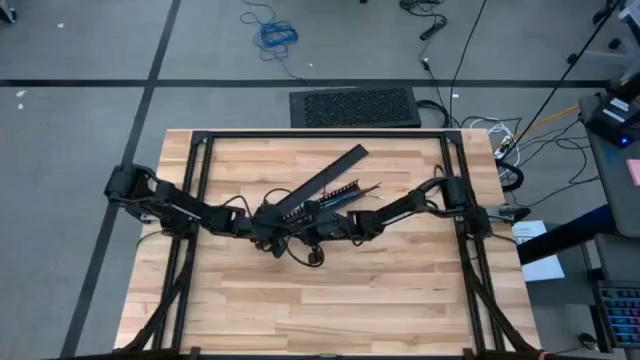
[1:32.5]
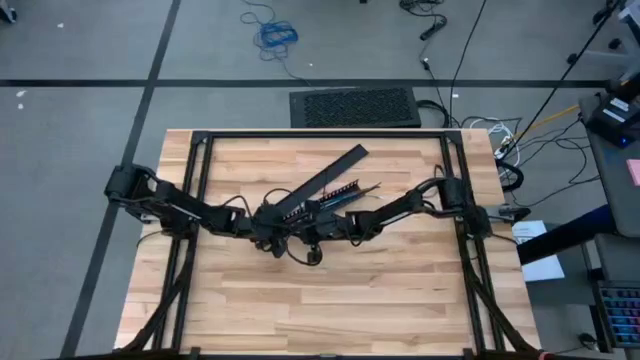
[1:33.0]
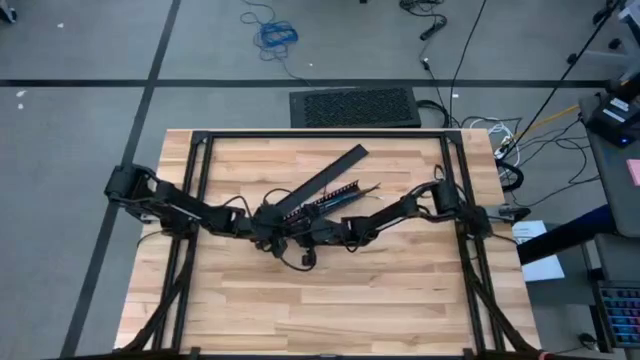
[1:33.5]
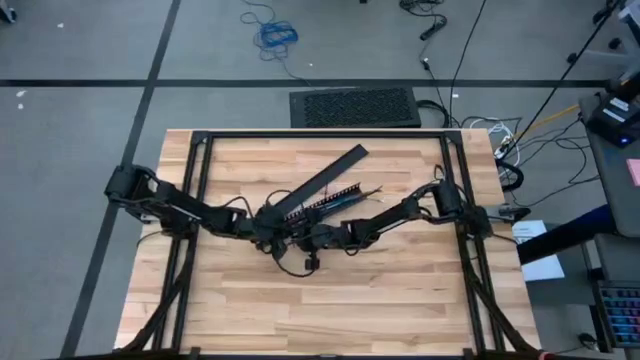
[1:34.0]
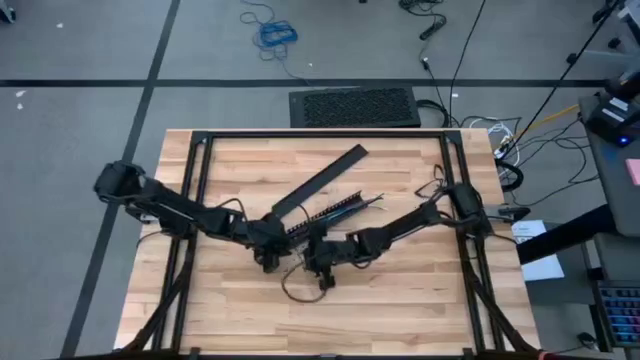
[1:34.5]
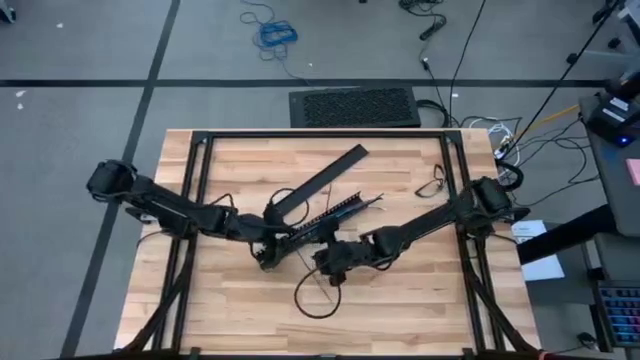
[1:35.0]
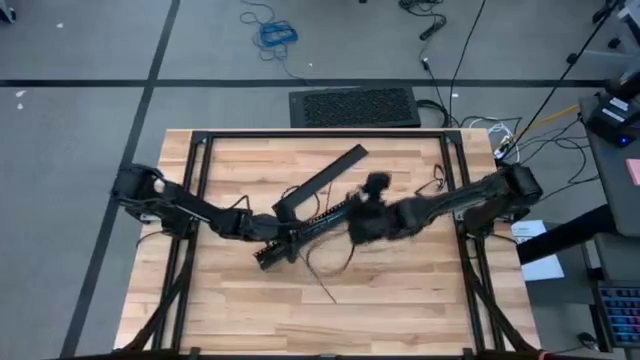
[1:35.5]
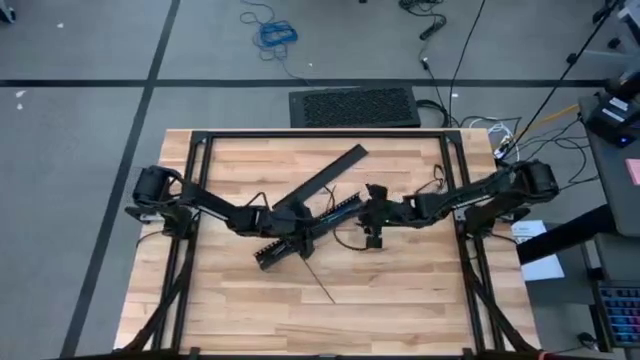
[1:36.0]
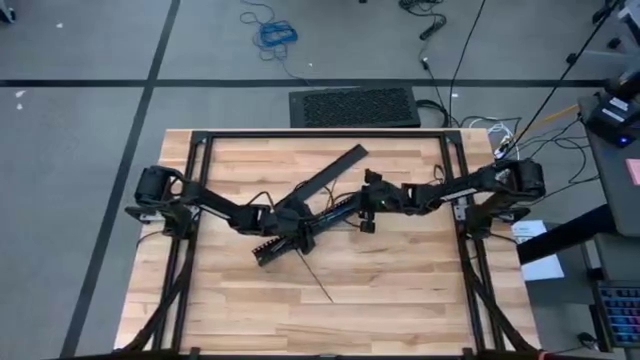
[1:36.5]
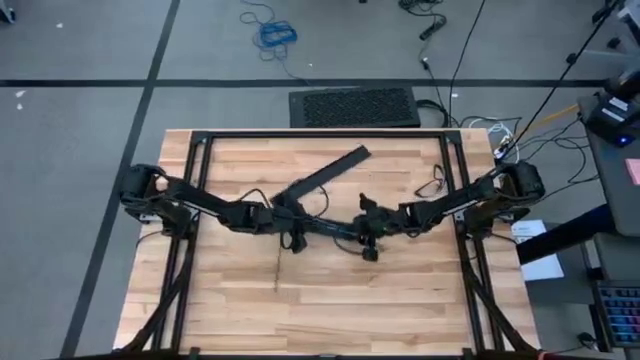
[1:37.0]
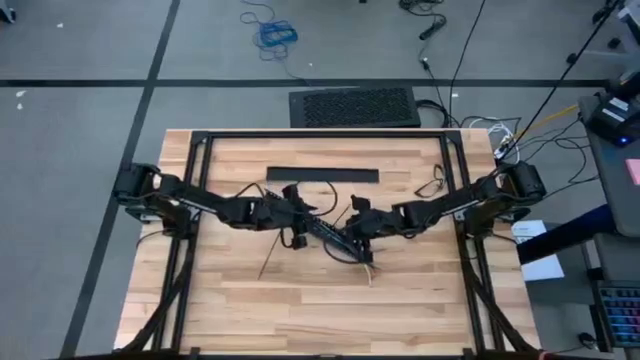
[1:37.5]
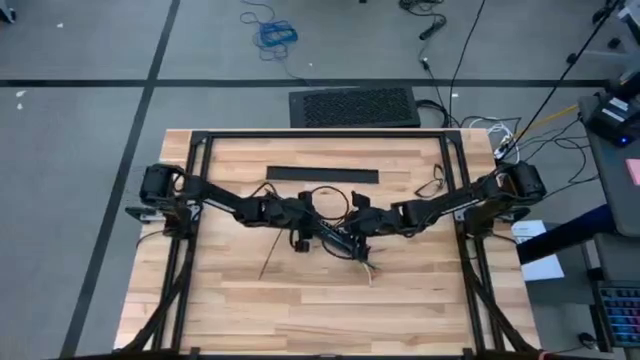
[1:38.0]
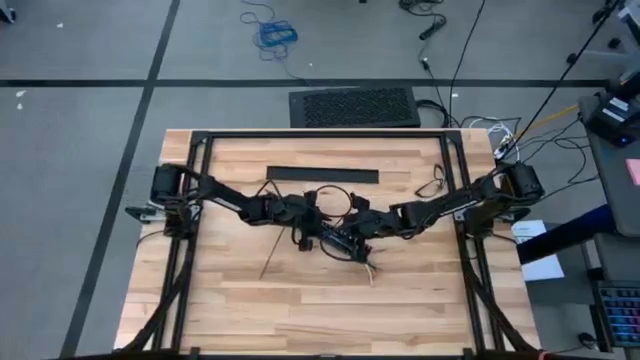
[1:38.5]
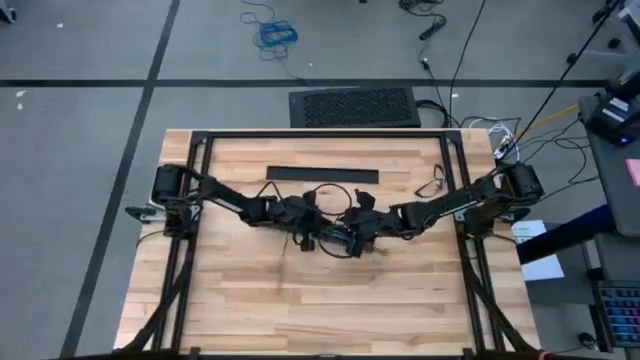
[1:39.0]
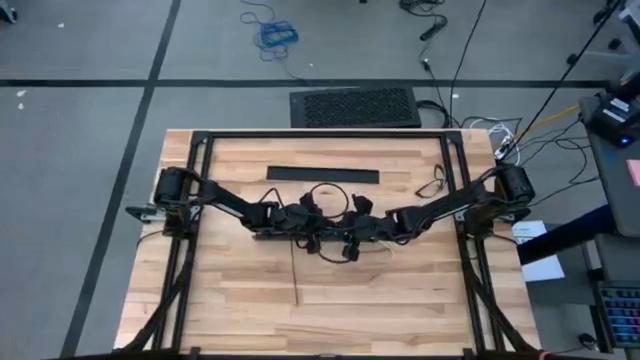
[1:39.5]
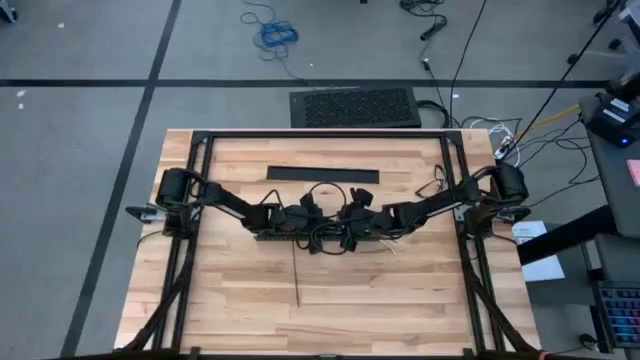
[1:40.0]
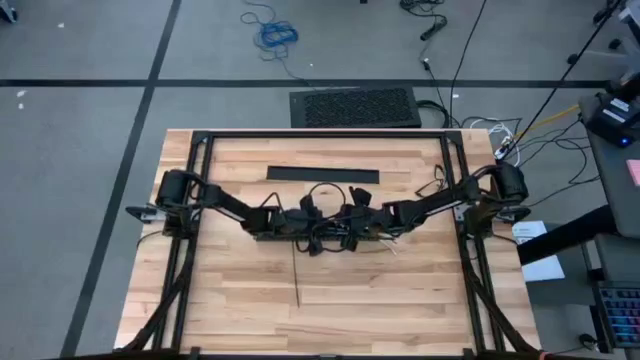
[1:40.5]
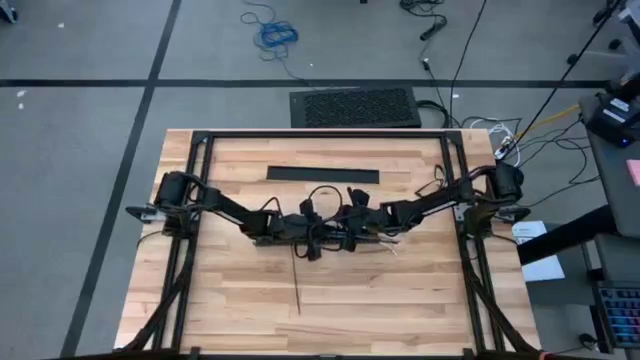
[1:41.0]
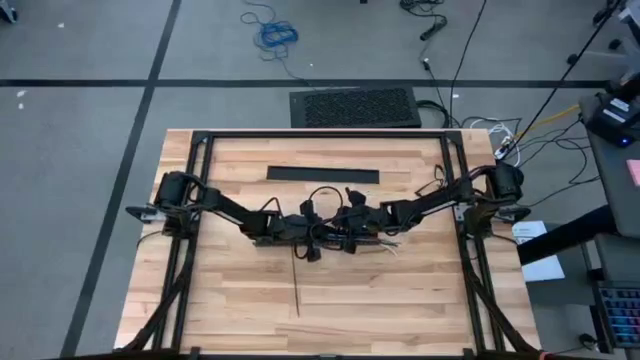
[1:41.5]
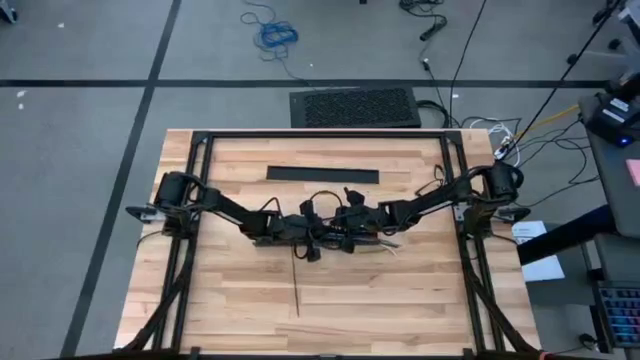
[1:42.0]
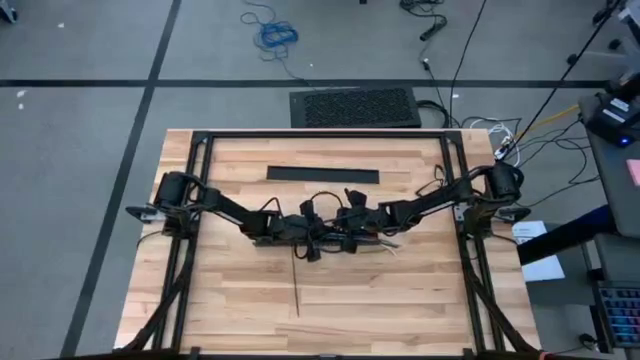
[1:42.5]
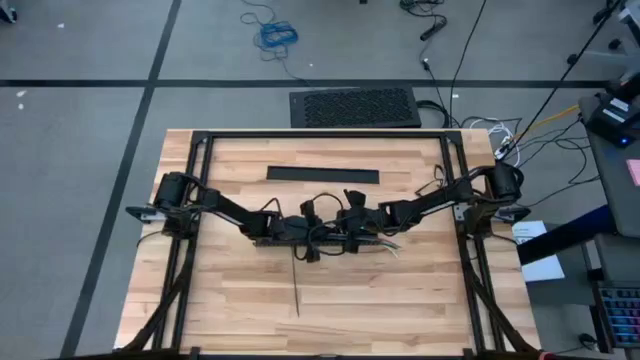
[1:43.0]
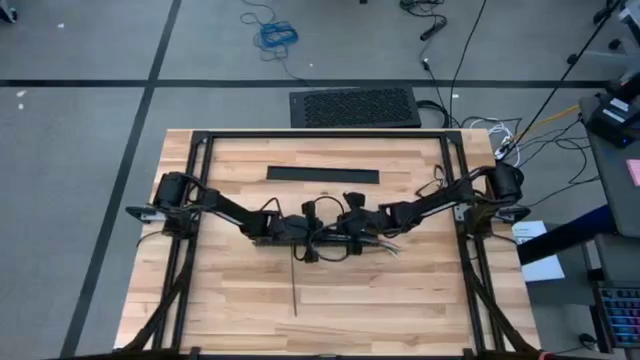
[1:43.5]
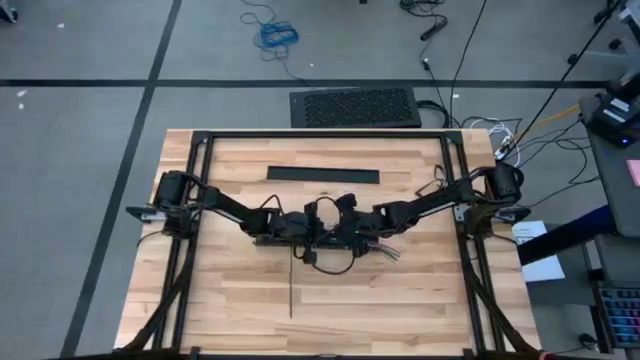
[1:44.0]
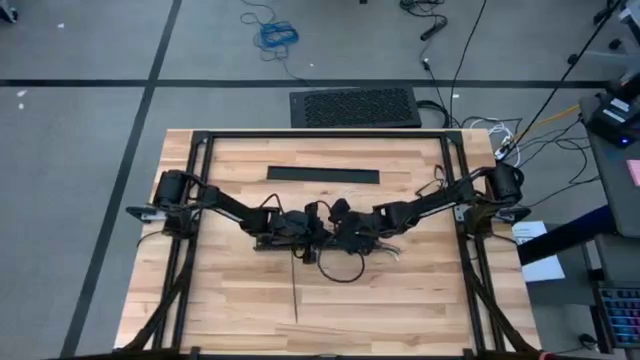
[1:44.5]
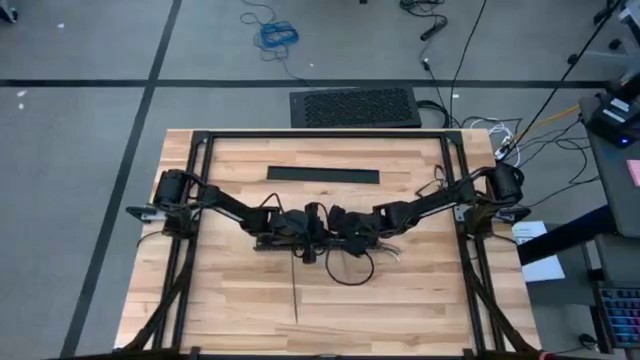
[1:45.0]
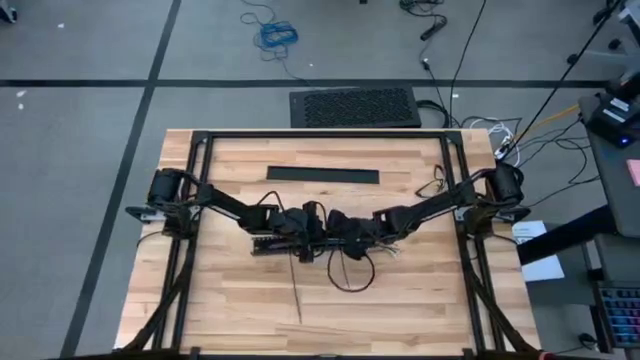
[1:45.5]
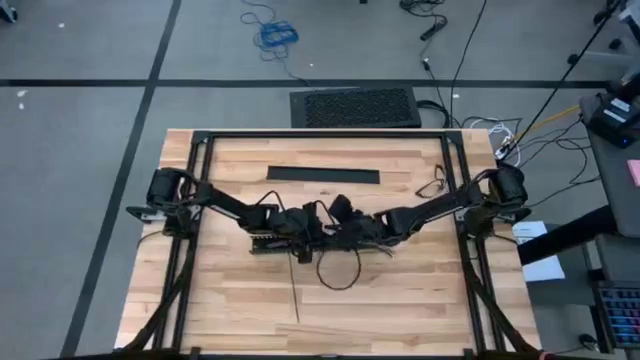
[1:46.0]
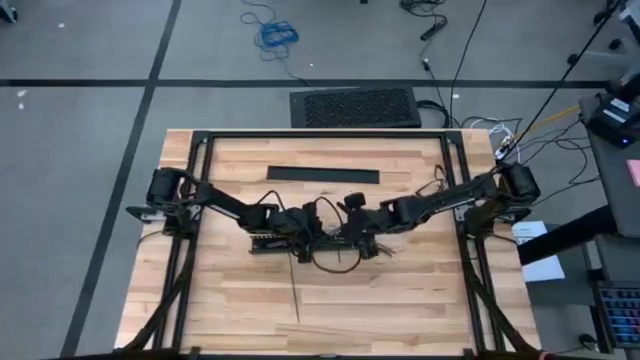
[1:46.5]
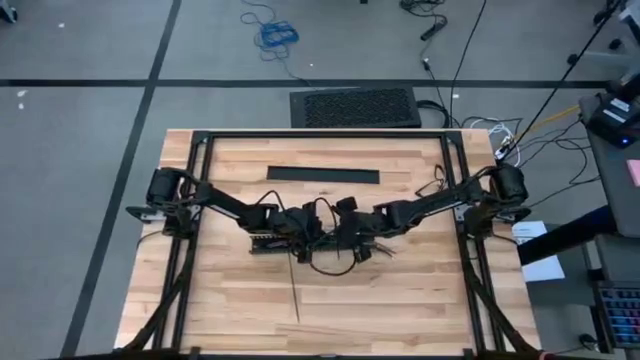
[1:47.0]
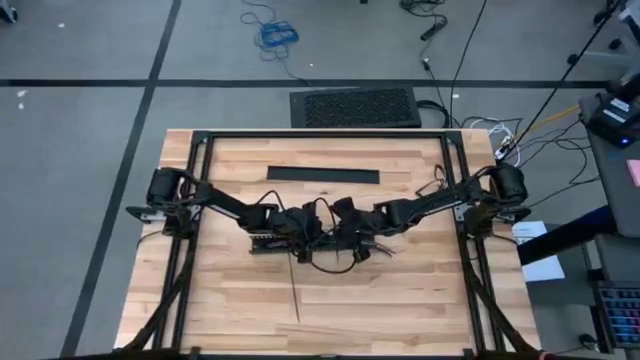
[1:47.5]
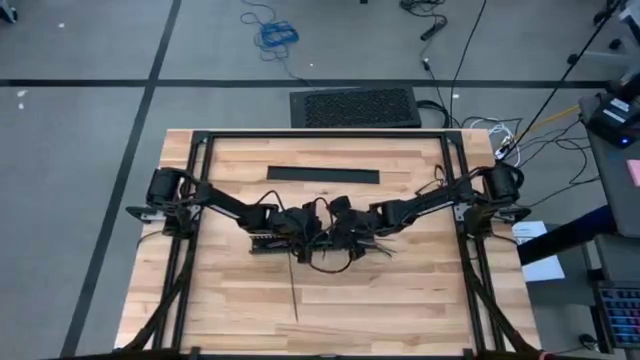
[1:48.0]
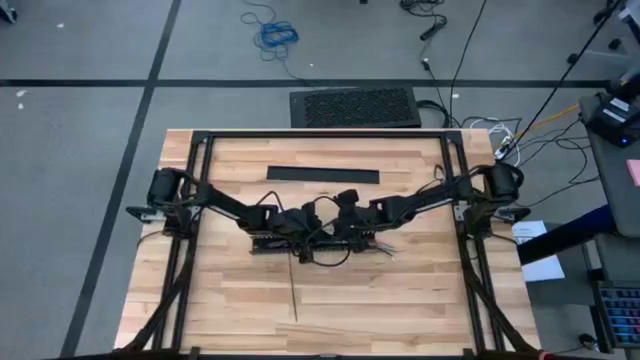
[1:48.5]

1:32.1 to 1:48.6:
Task: Ziptie cables
Put the ziptied cables into a black cable duct

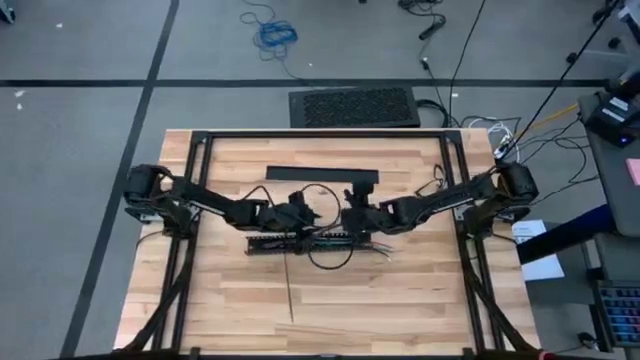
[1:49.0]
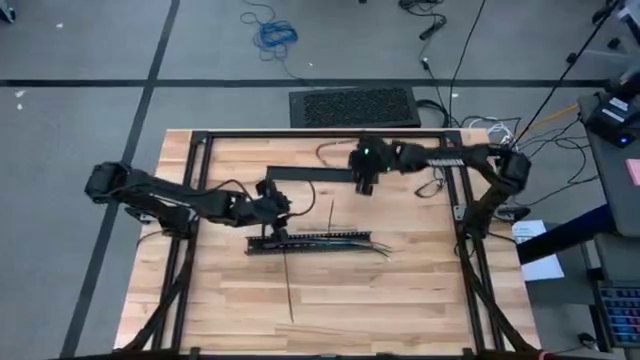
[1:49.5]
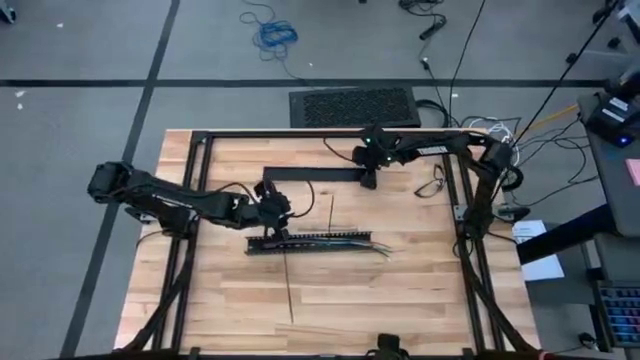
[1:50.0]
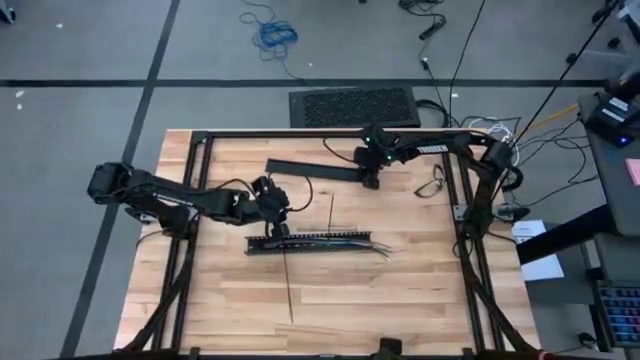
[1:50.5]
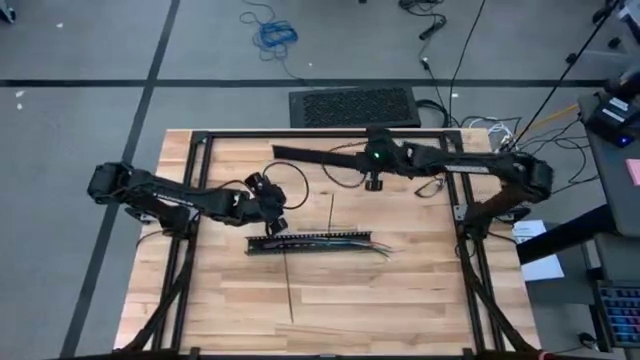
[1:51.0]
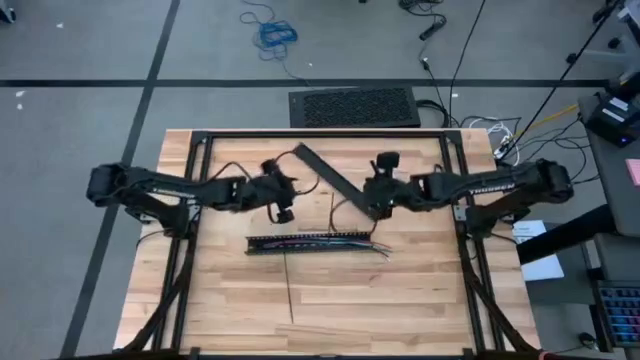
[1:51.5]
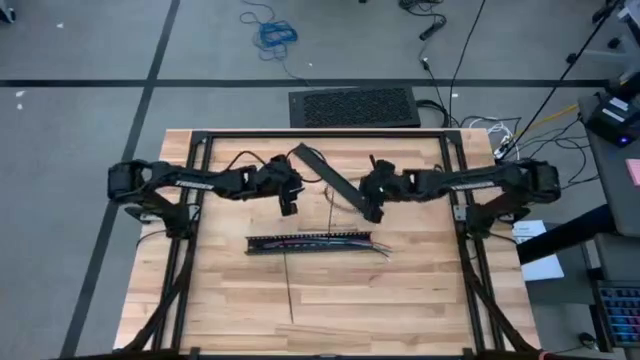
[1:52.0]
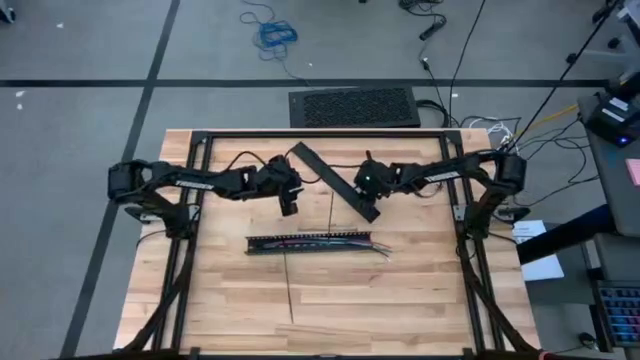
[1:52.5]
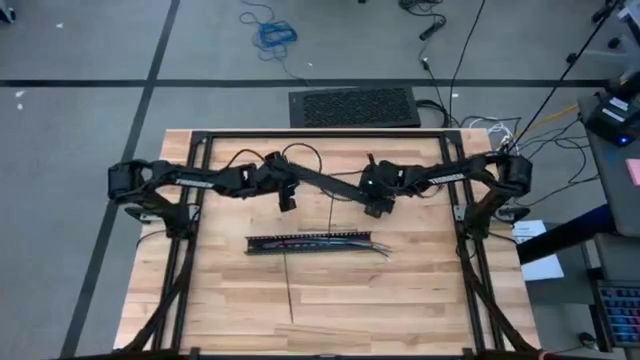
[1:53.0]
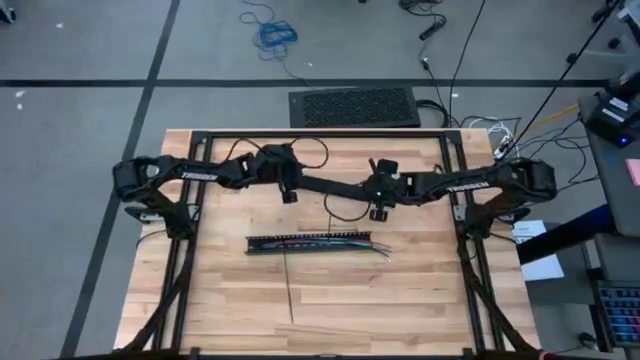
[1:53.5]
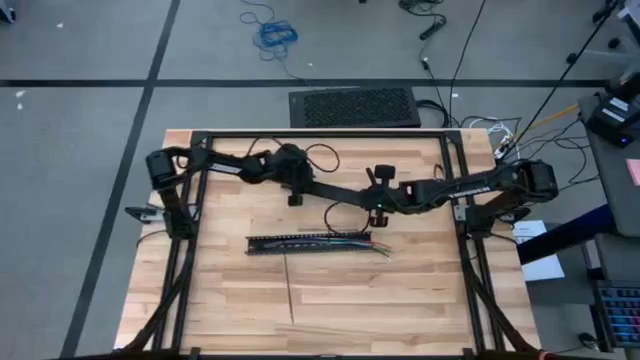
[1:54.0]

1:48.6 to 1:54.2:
Insert the black cable duct cover into the black cable duct
